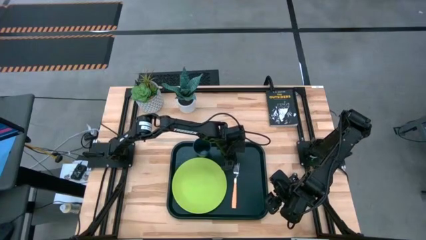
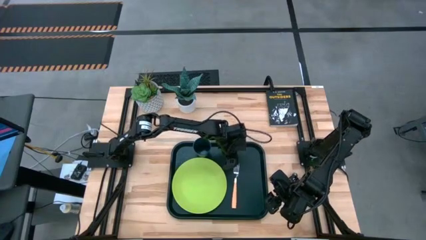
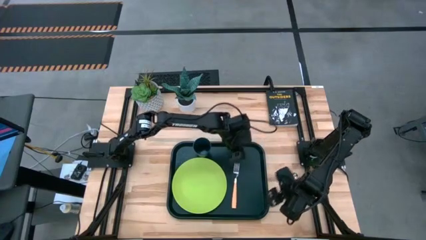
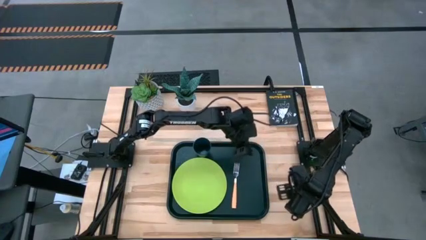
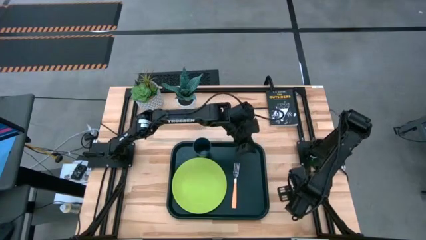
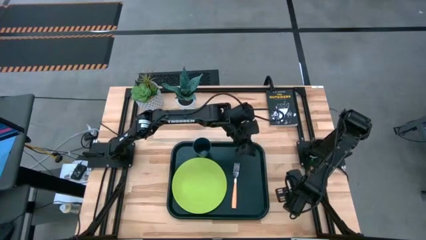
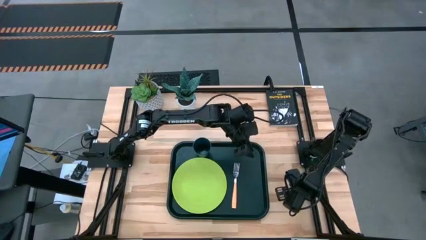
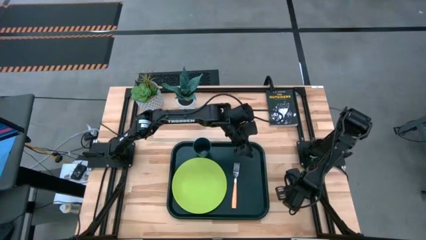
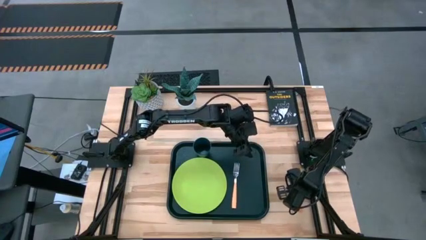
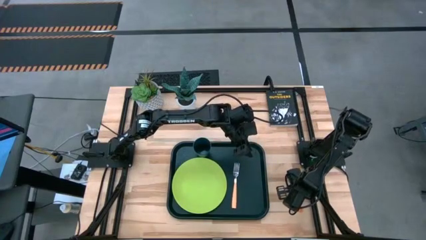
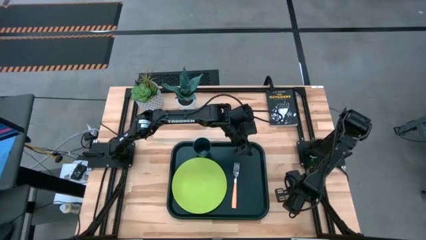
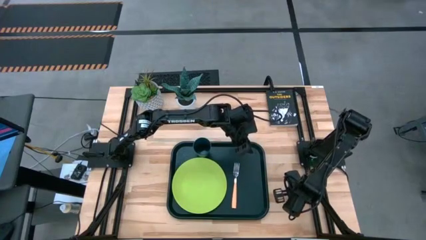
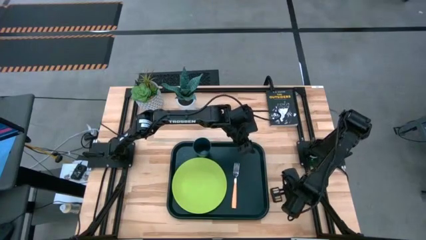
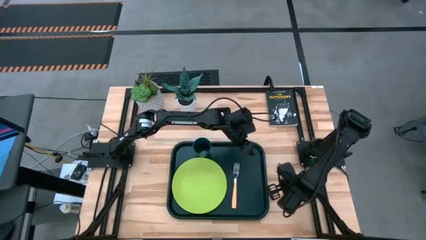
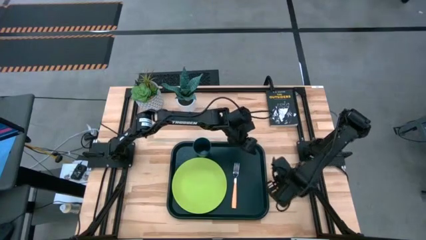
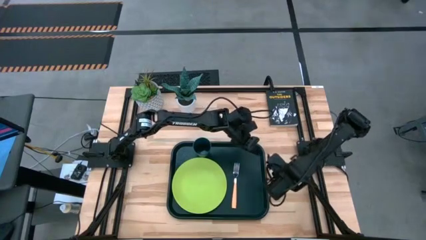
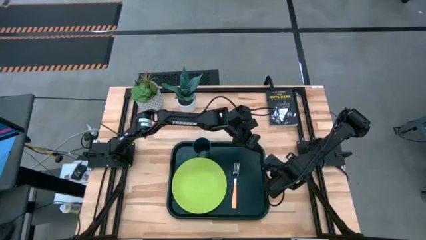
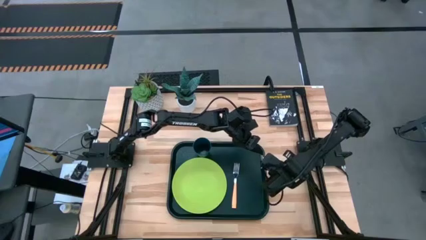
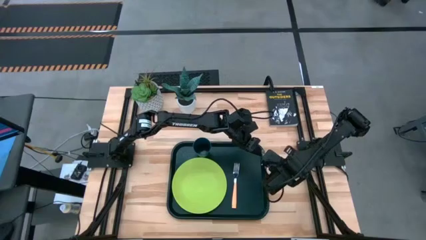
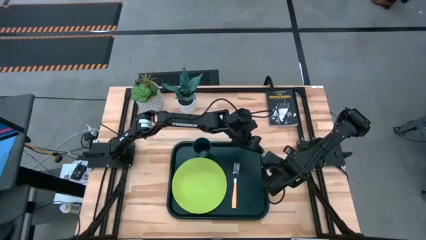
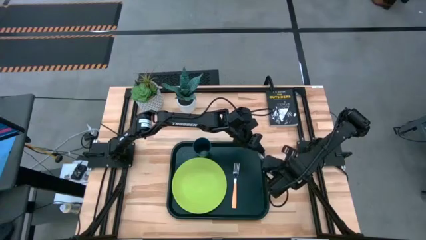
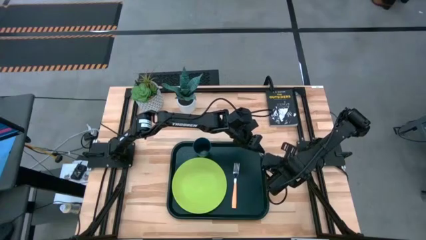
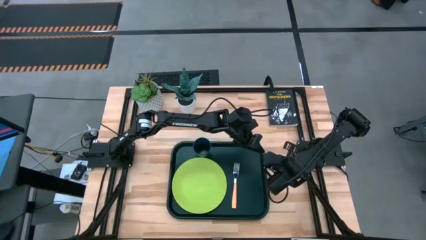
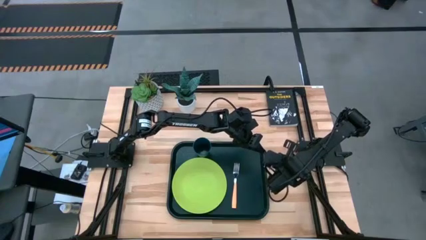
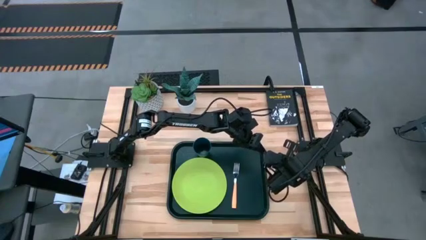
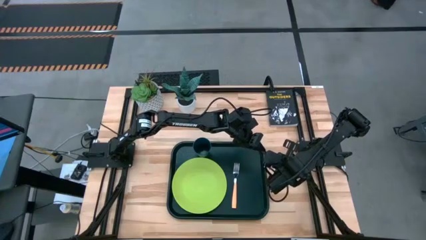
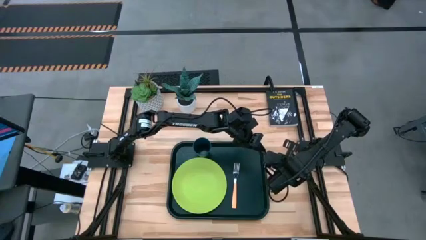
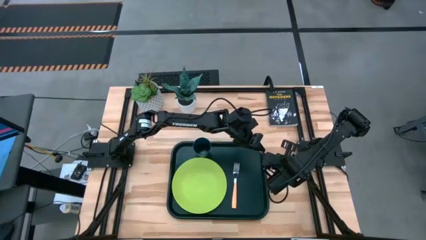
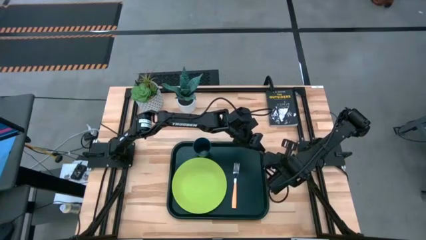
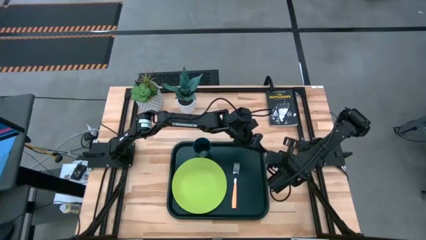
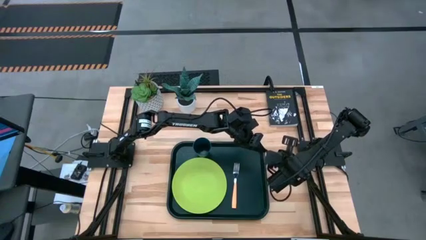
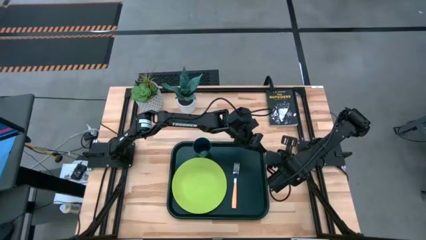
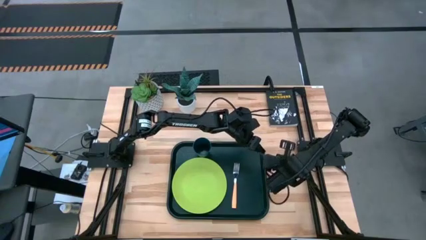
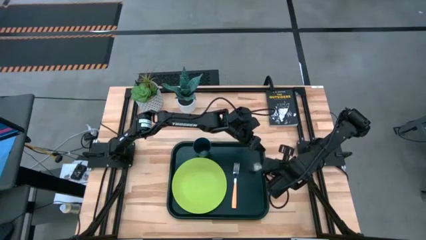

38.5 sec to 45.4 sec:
Task: Pick and place plate/cup/fork/spoon on tray
Put the orange spoon on the black serving tray to the right of the orange fork

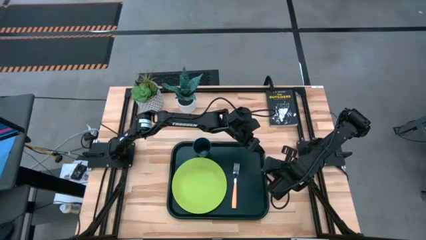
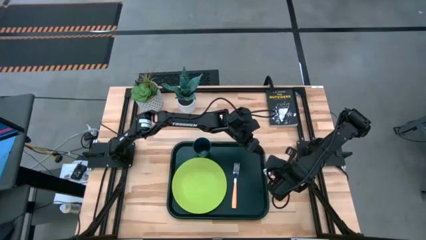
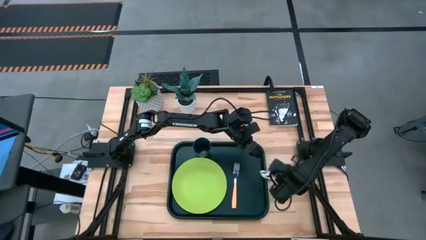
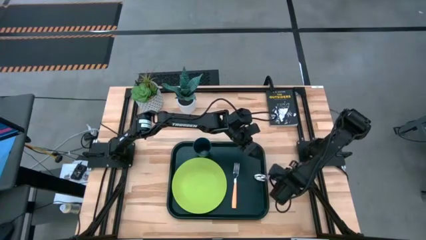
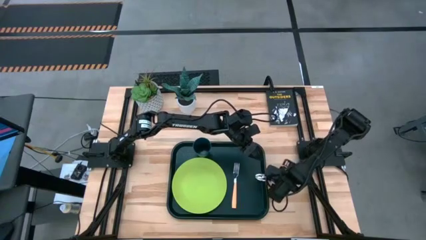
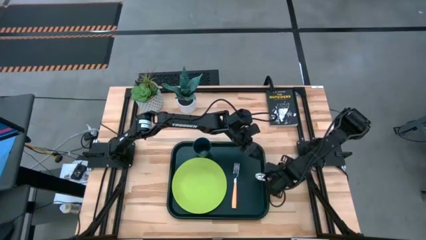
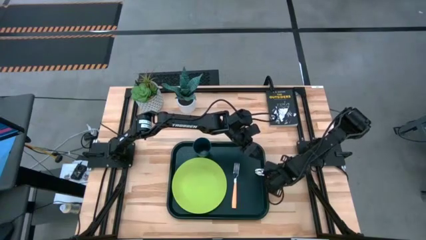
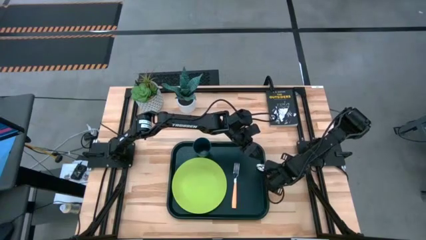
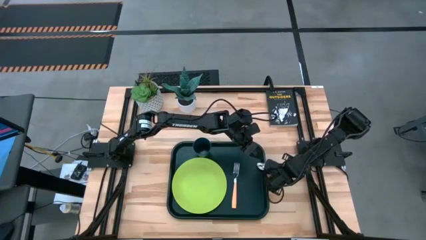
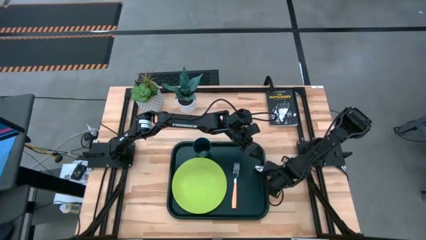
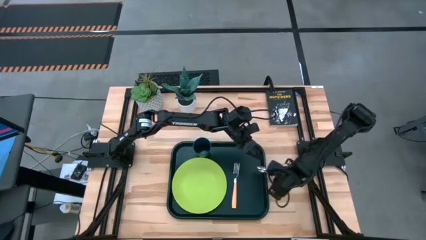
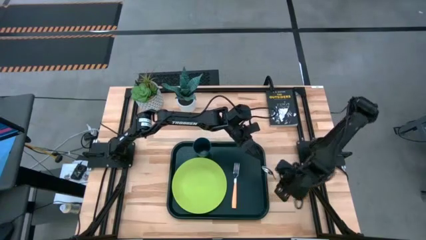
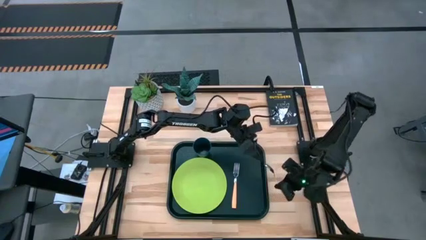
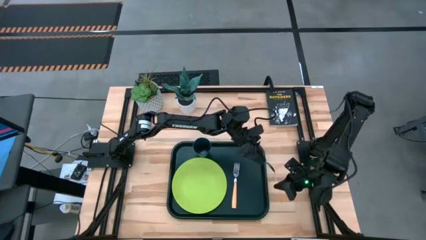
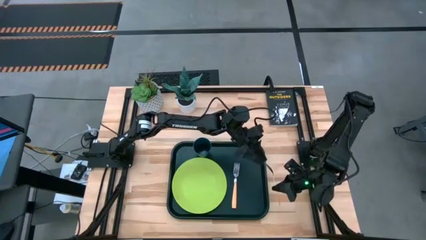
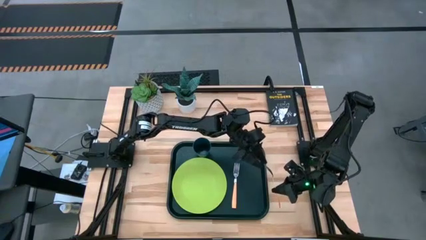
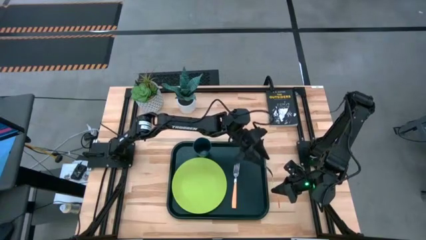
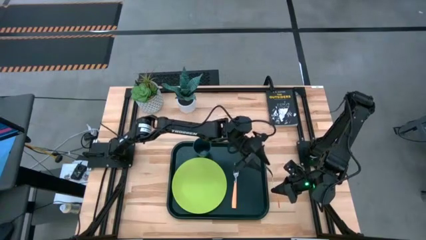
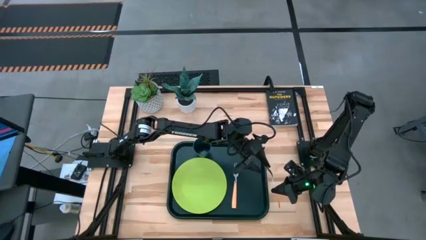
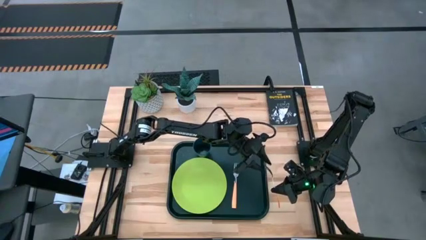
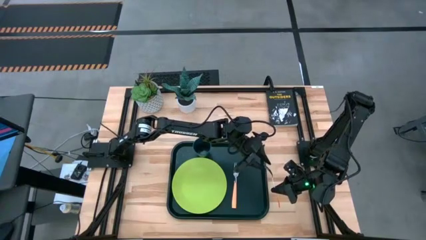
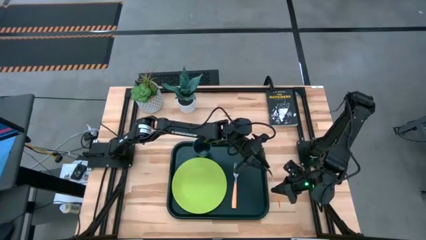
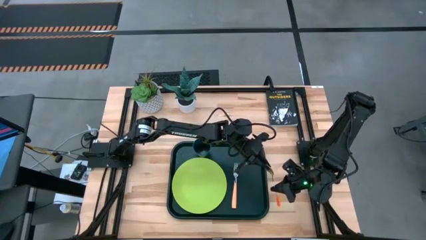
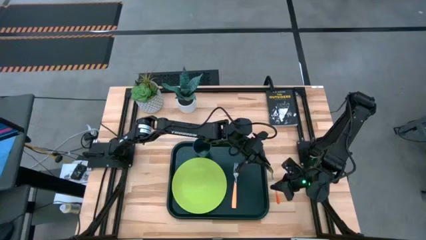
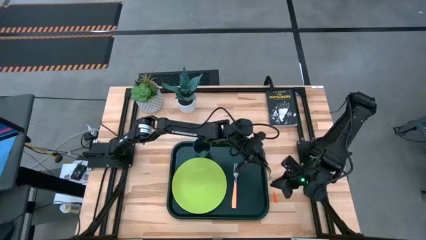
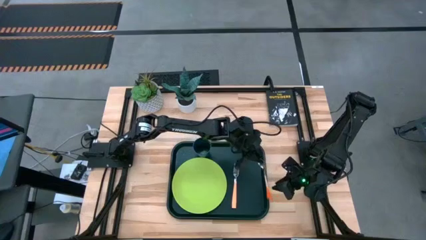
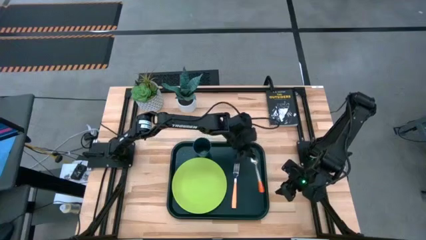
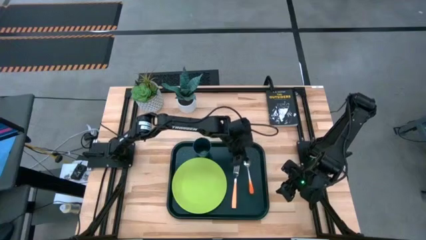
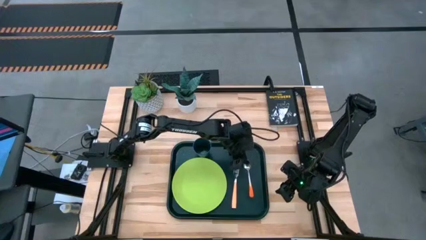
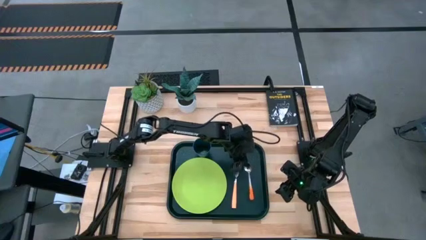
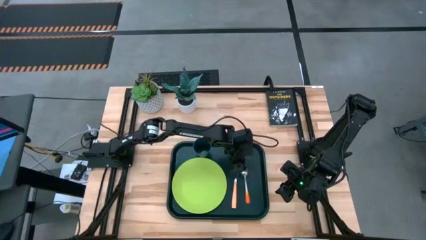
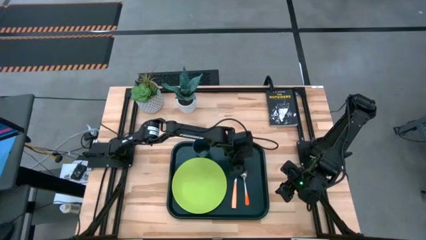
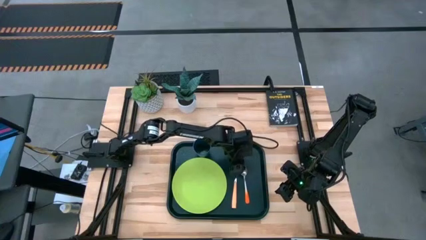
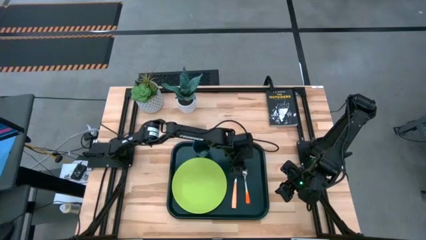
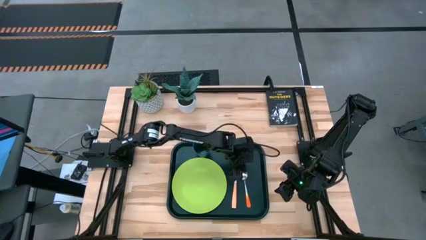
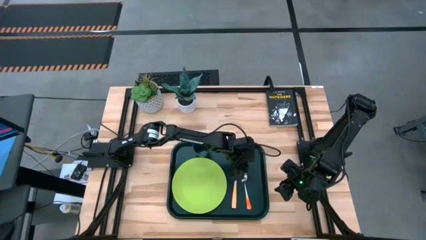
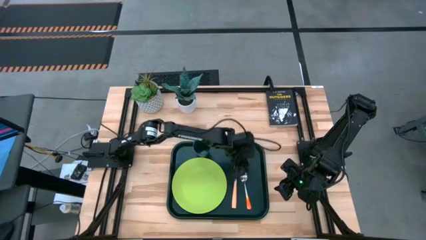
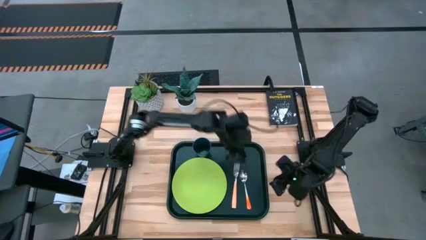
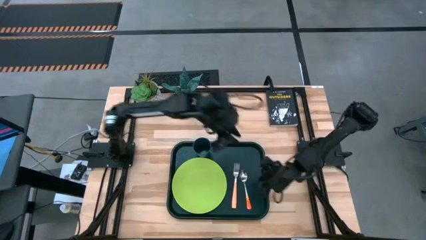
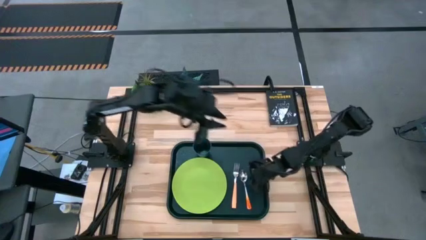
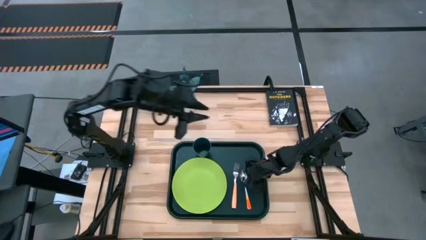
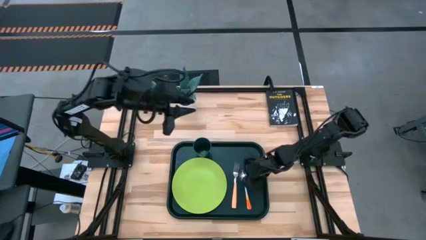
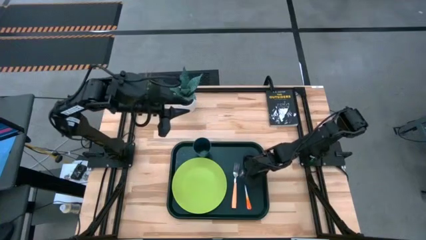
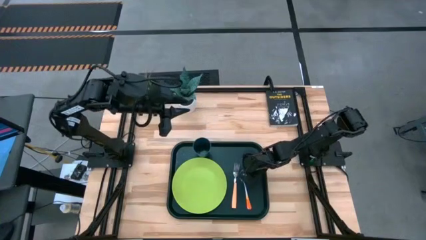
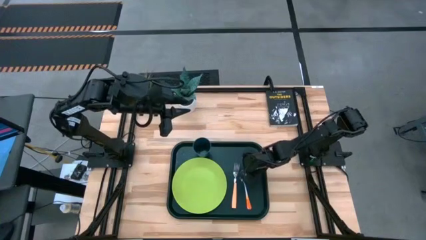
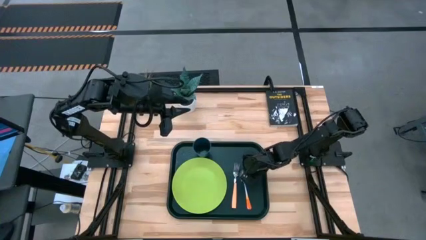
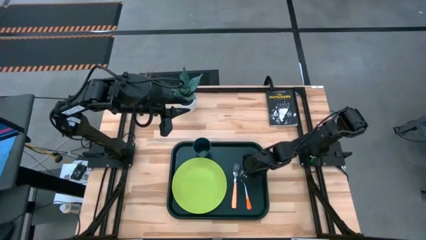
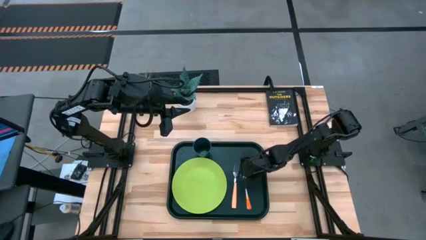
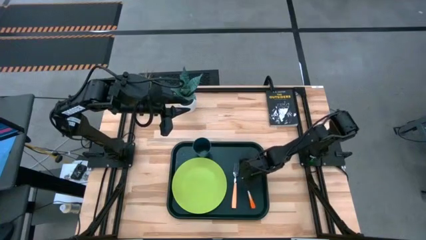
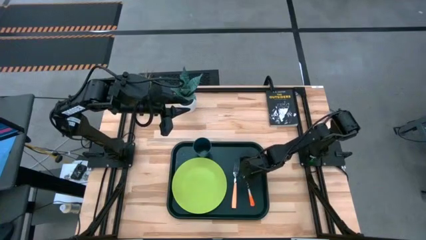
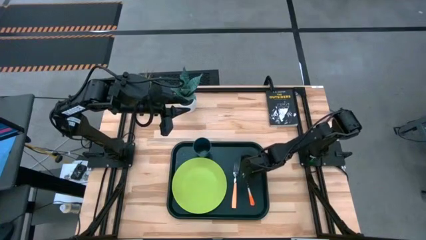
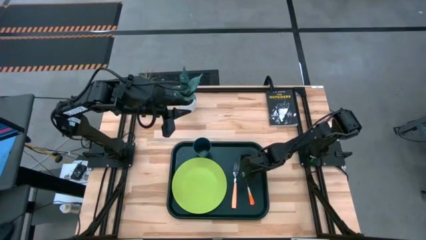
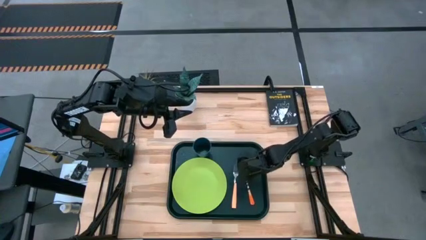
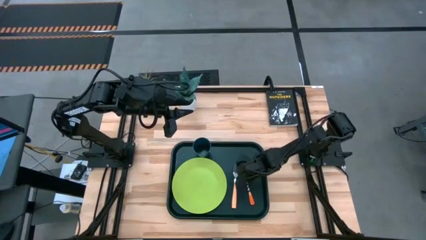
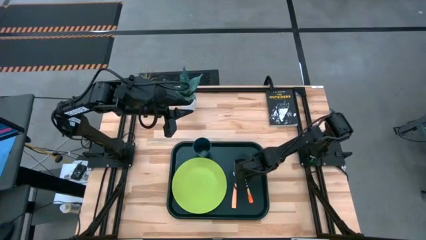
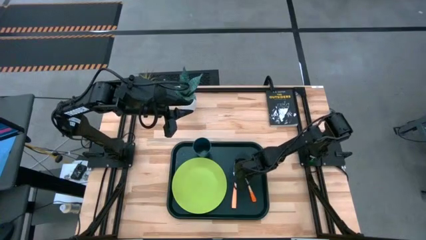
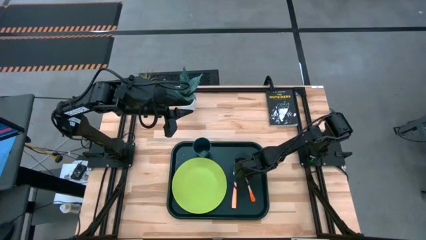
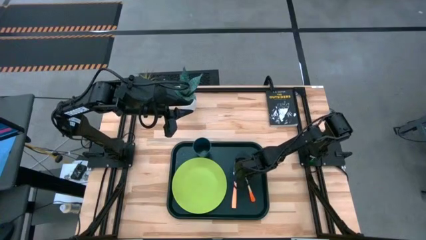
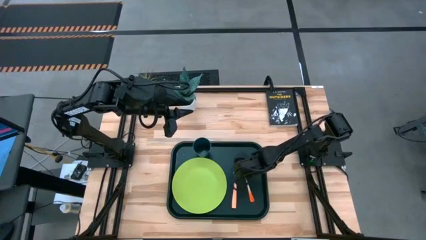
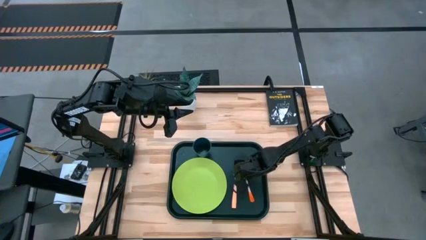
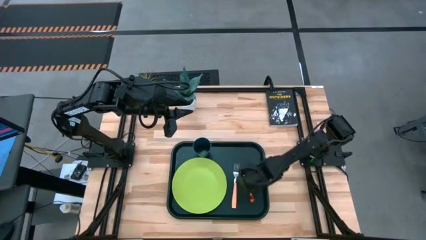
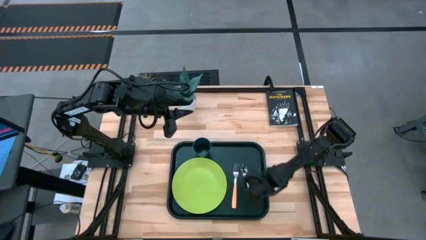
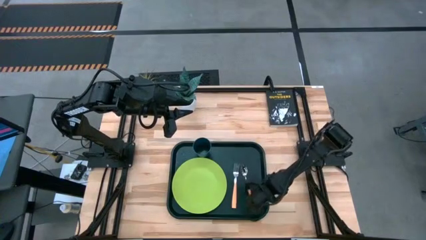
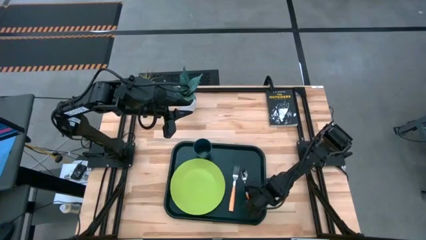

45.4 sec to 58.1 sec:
Put the orange spoon on the black serving tray to the right of the orange fork
